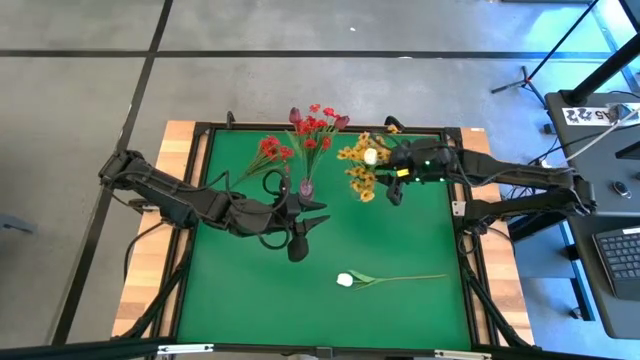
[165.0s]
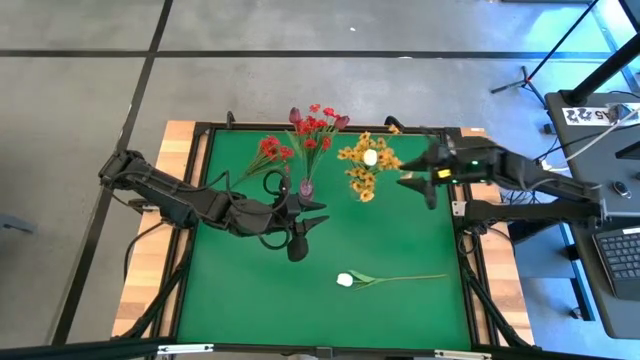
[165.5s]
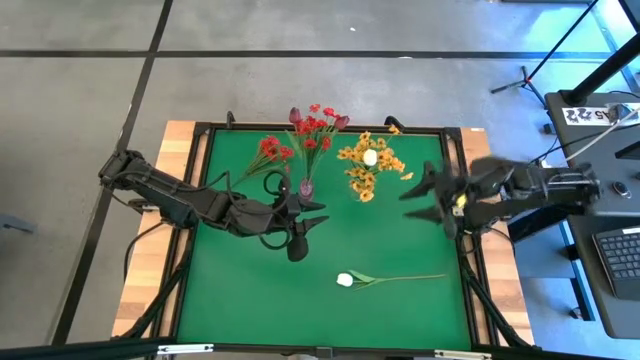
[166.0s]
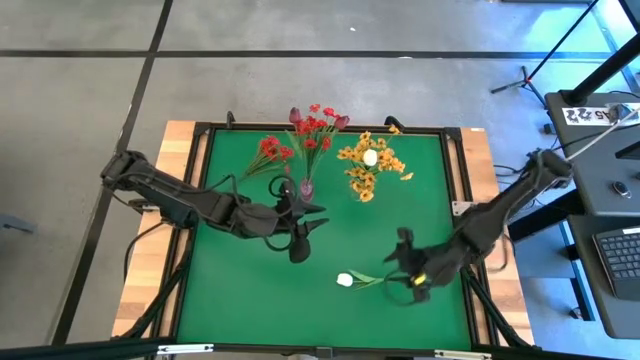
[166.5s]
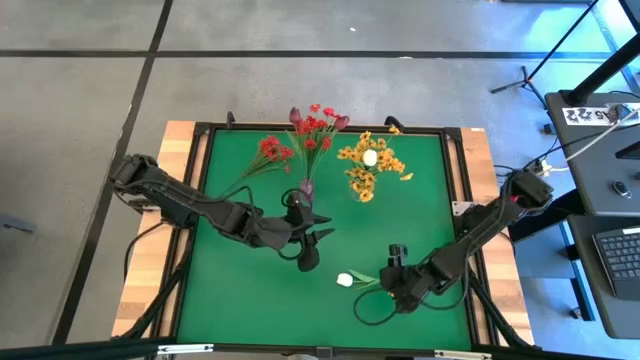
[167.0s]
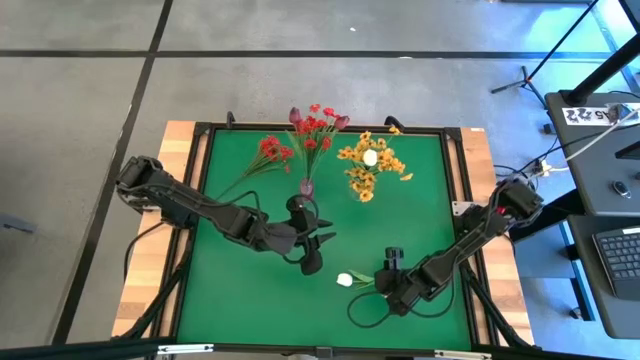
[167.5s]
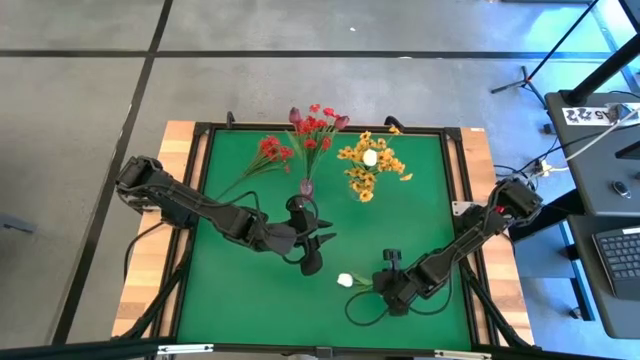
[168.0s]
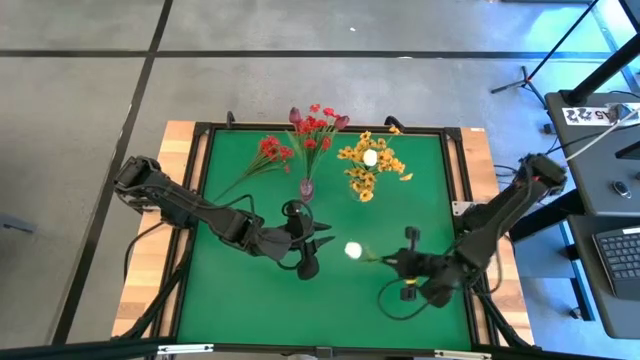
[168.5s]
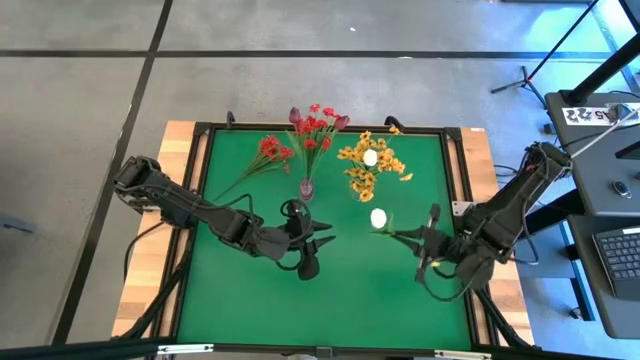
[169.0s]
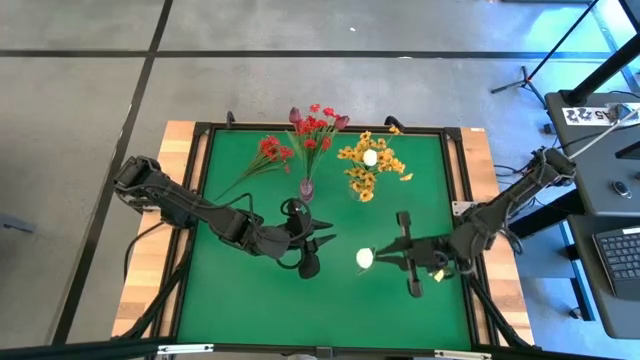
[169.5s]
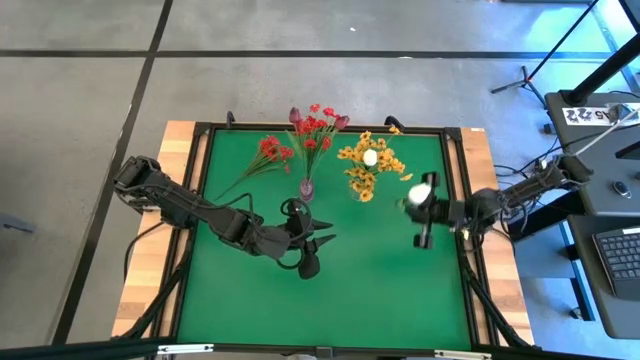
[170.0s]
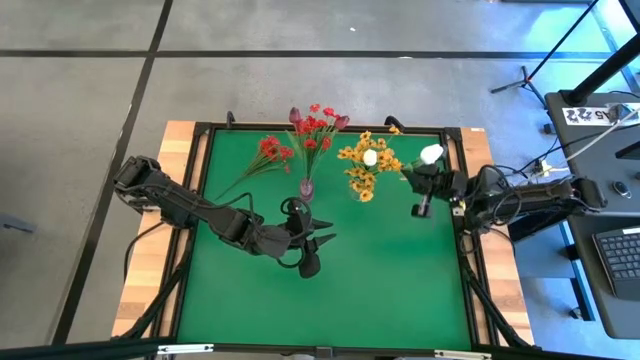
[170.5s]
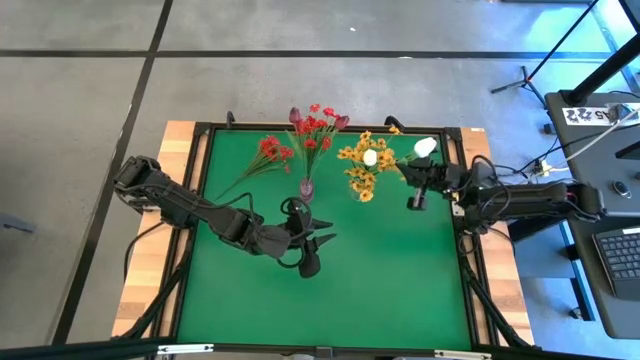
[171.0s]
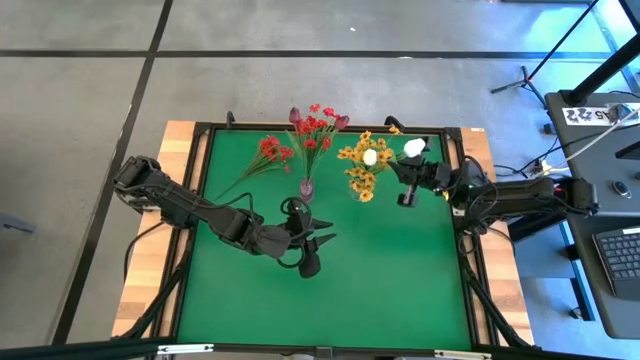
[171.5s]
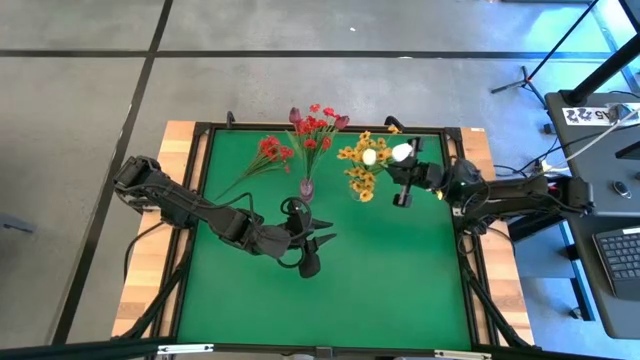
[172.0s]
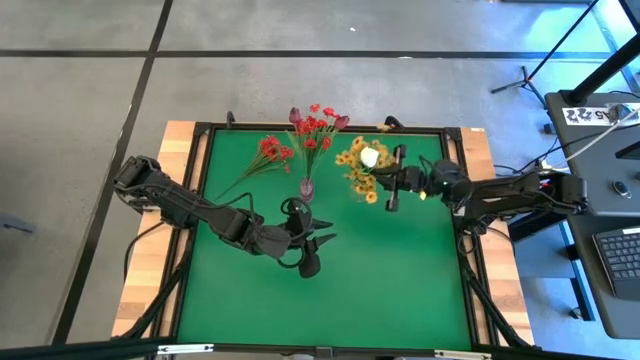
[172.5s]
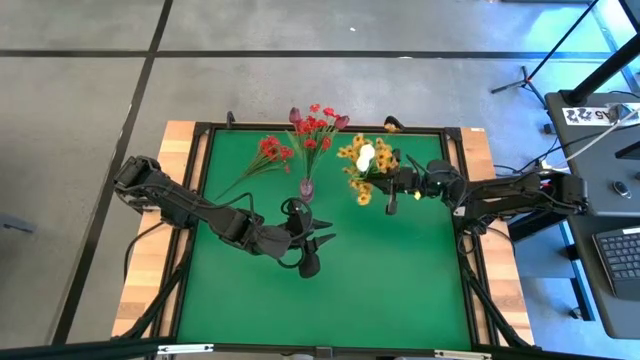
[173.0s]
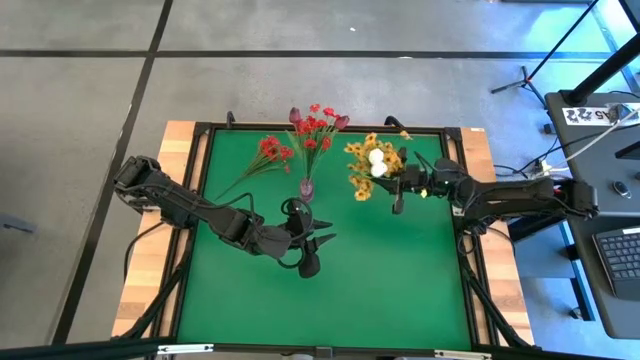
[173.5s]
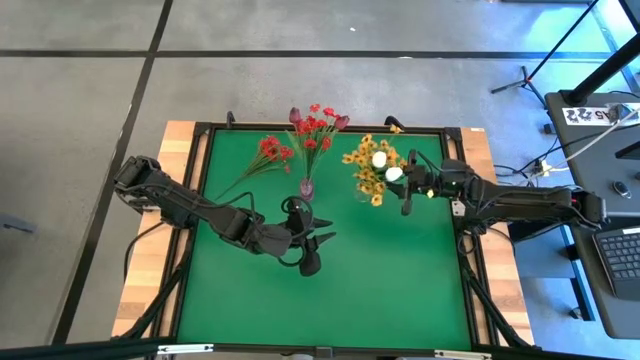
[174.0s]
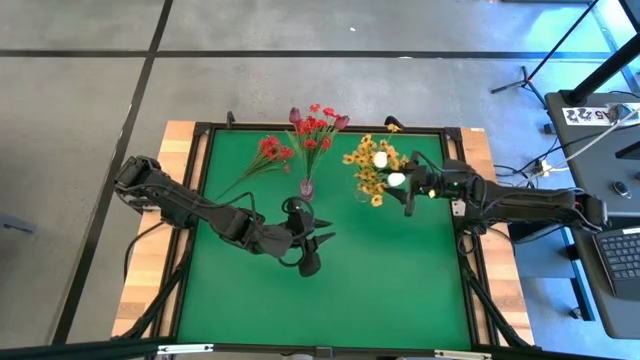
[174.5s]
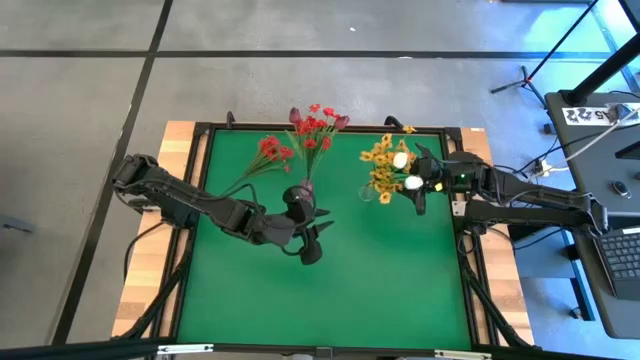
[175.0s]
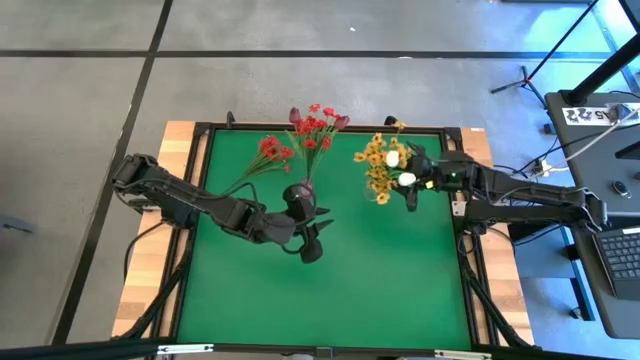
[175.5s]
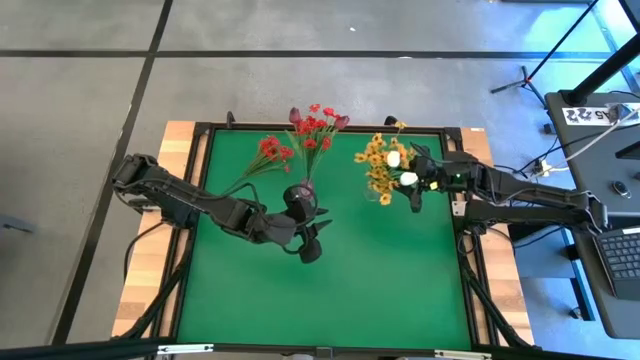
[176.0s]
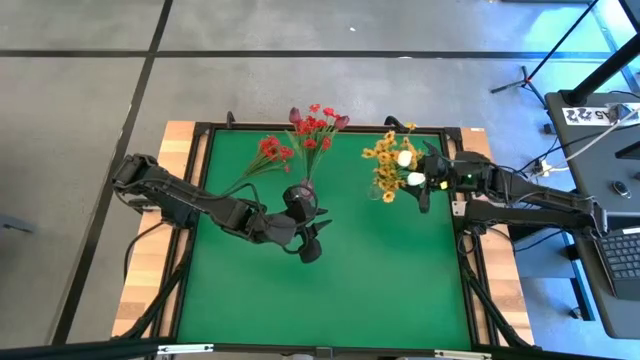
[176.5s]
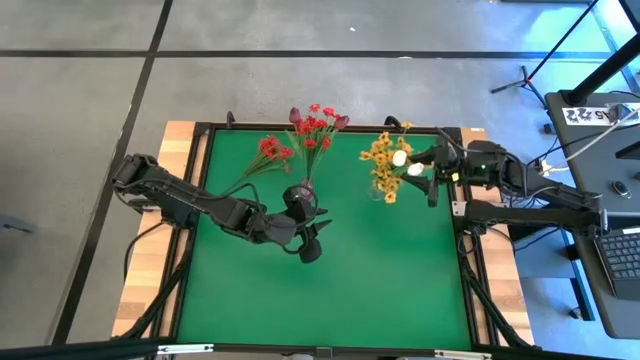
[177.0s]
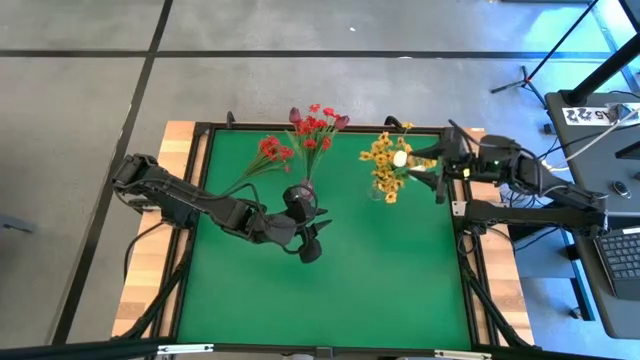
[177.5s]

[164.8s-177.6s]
Task: Sort flowers into vase by color
Put the white tulip into the transparent vase

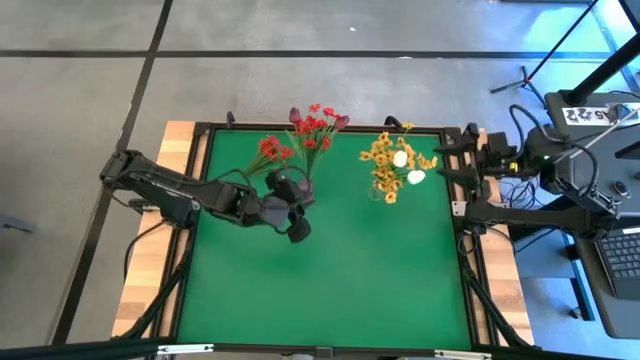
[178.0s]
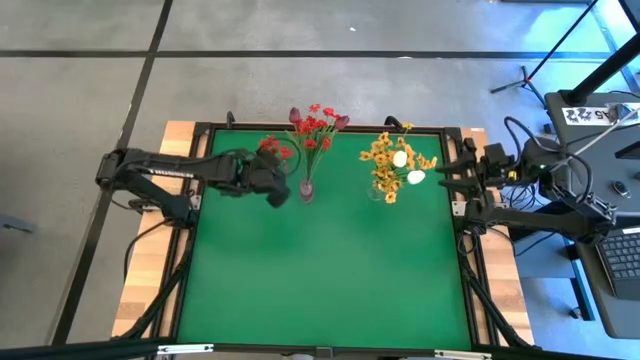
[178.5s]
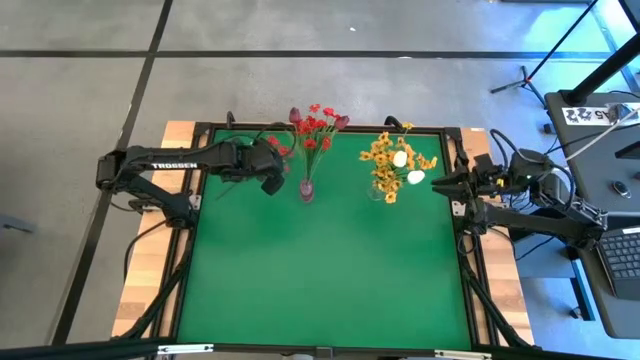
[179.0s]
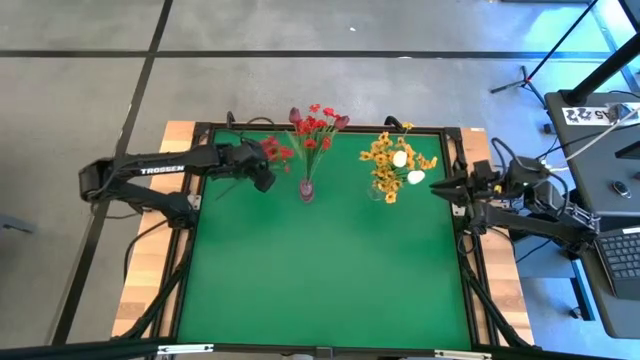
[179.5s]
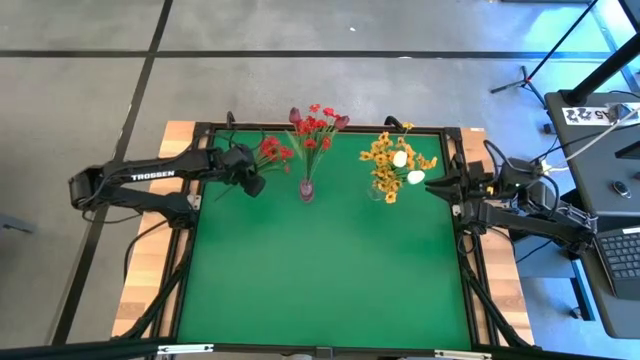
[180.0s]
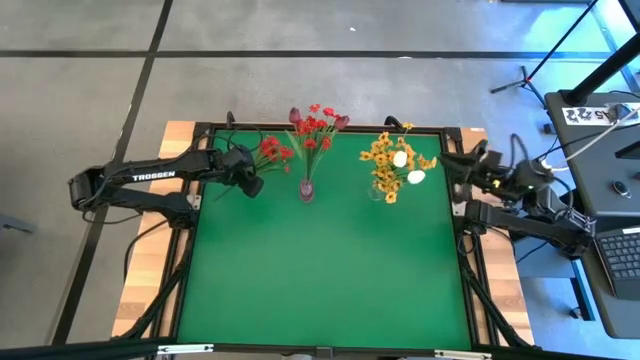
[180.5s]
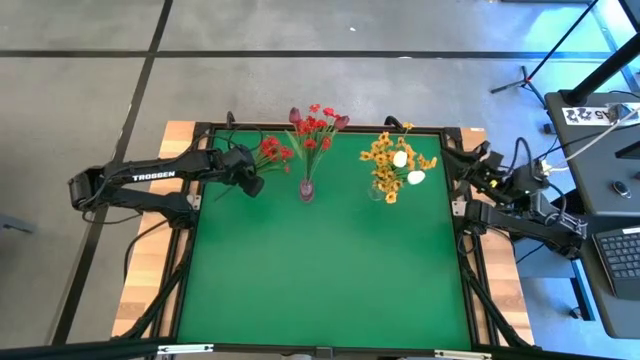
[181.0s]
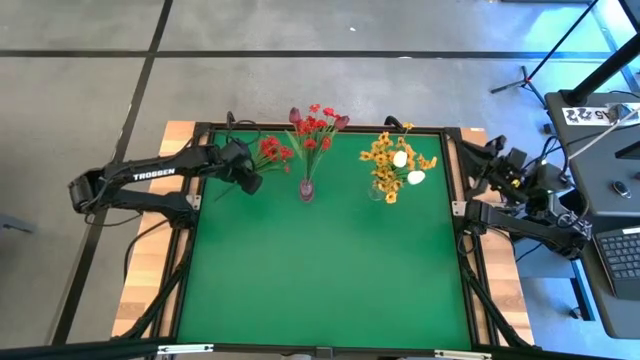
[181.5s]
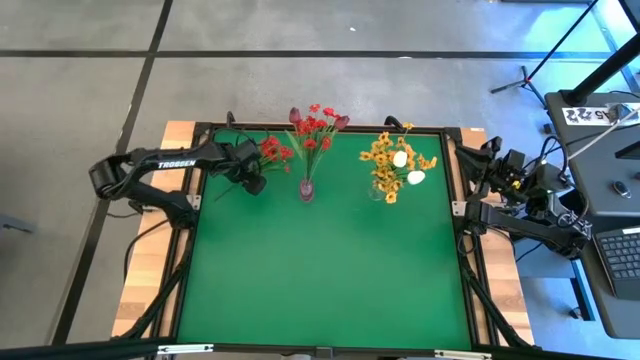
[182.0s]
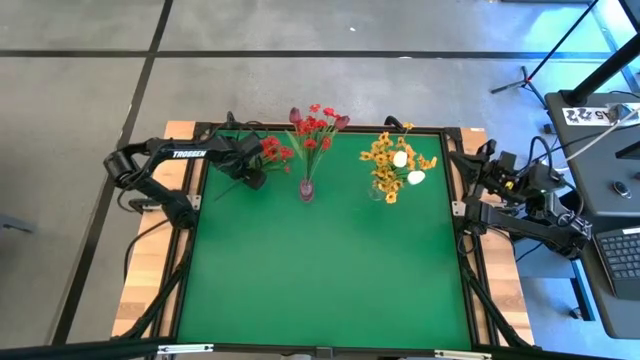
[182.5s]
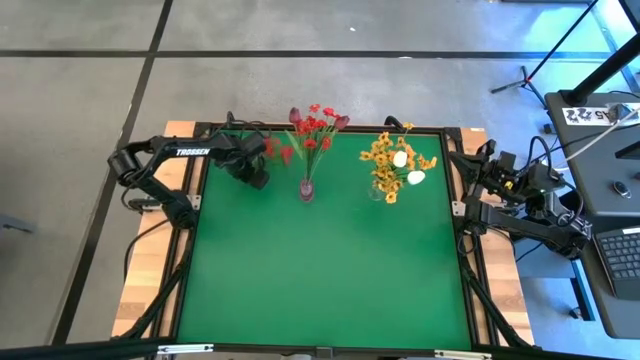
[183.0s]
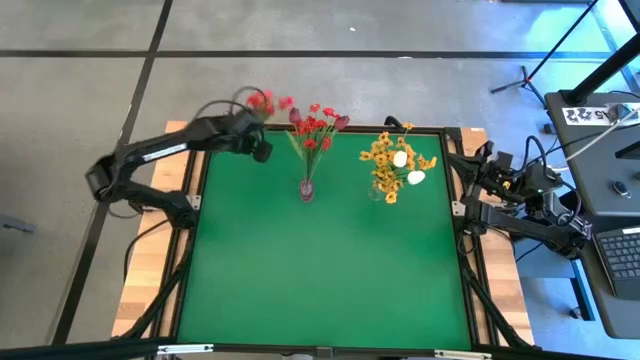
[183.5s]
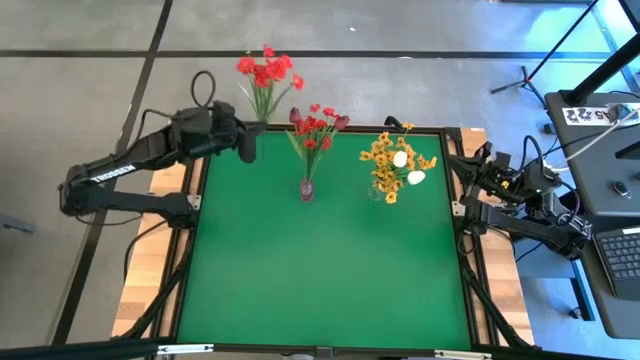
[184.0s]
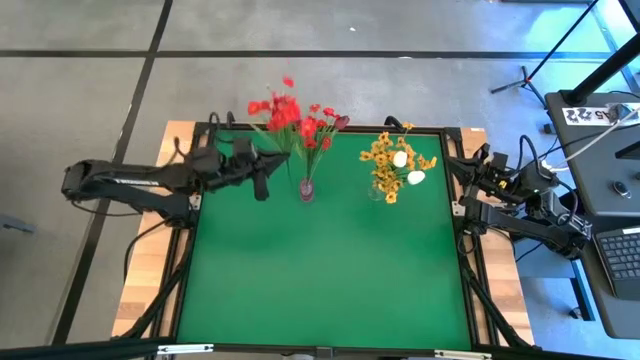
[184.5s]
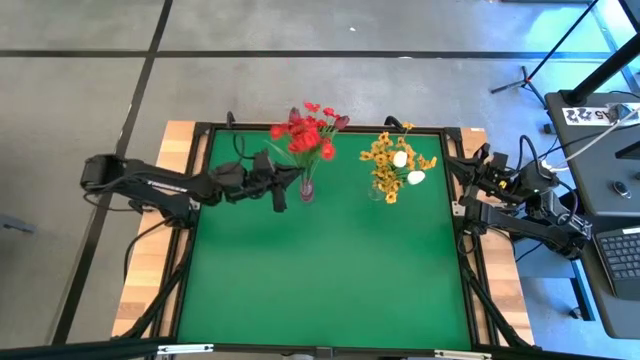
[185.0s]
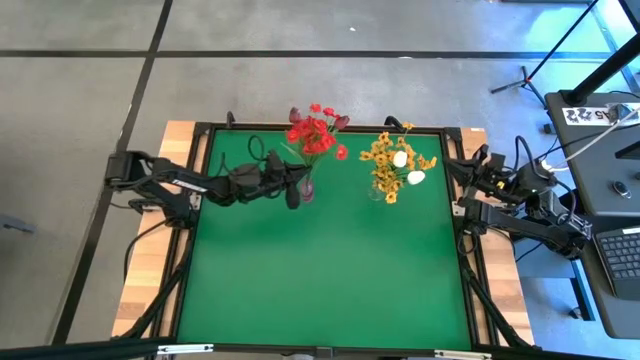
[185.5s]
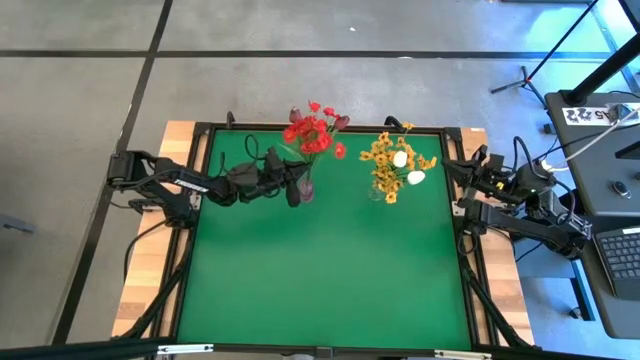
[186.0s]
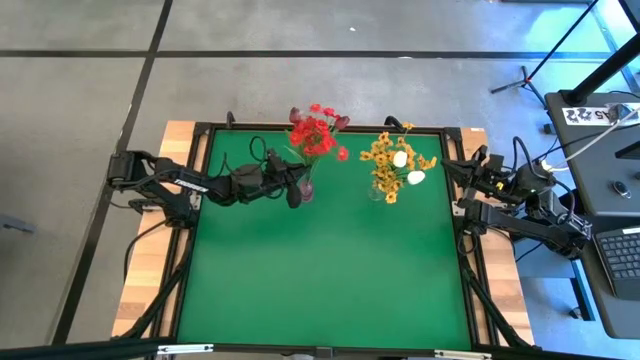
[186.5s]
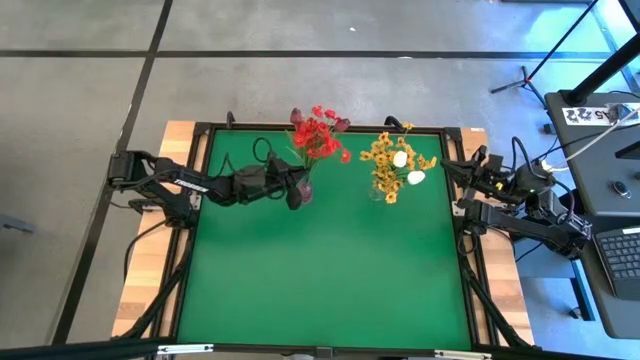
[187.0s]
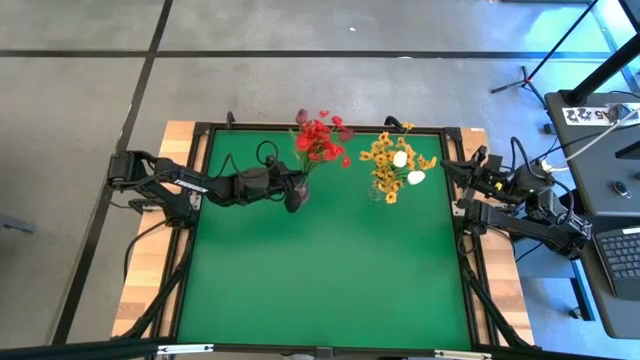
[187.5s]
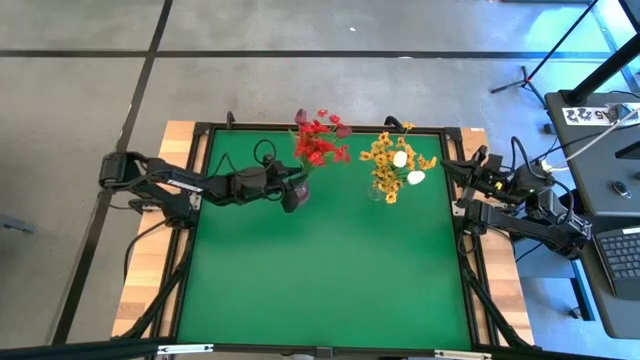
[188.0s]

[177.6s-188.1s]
Put the red flowers into the pink vase
